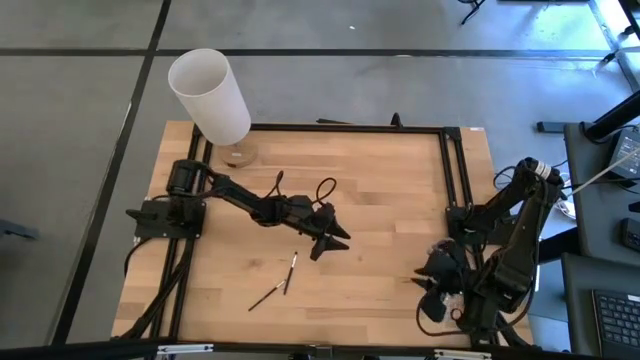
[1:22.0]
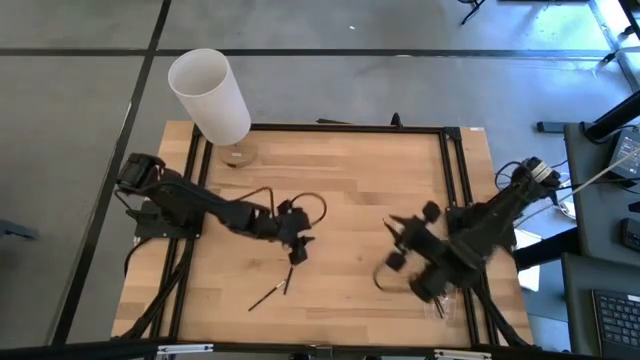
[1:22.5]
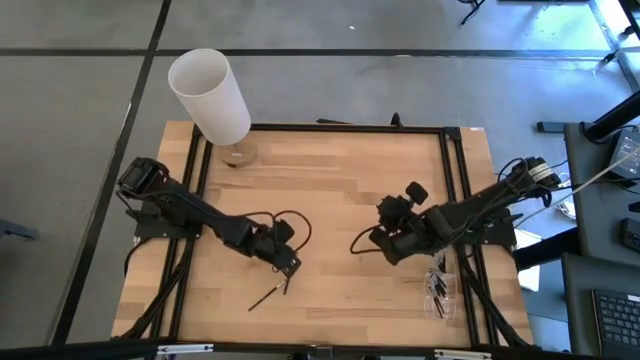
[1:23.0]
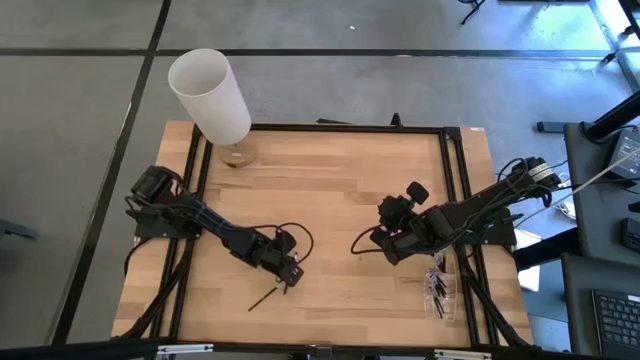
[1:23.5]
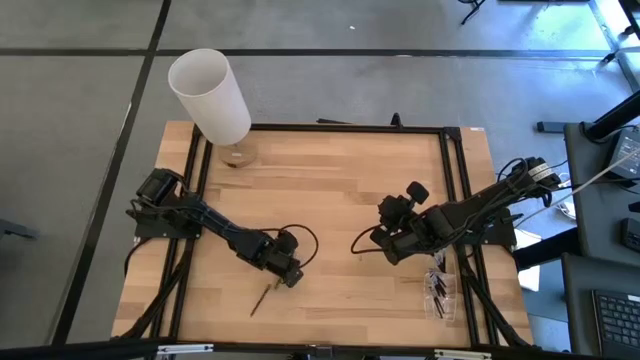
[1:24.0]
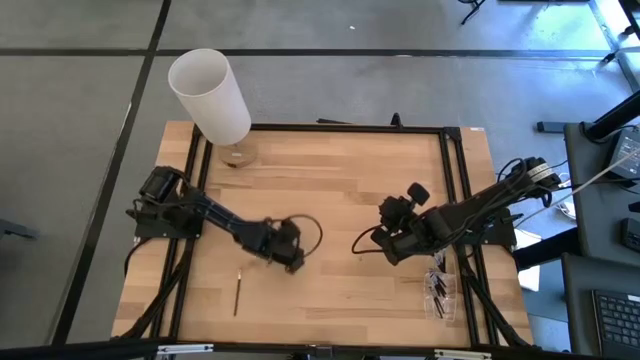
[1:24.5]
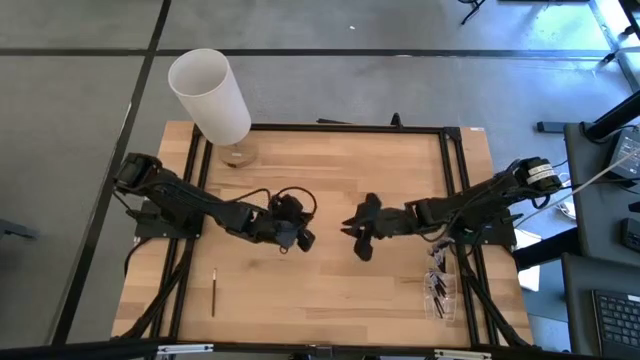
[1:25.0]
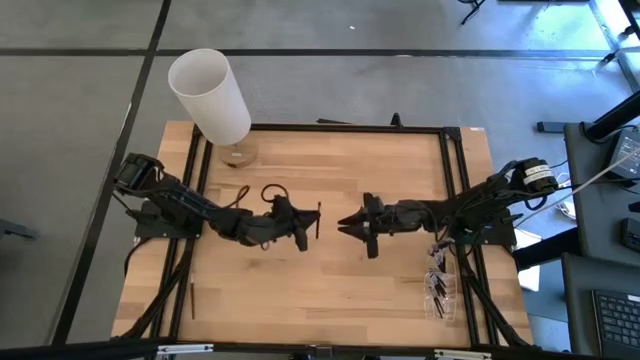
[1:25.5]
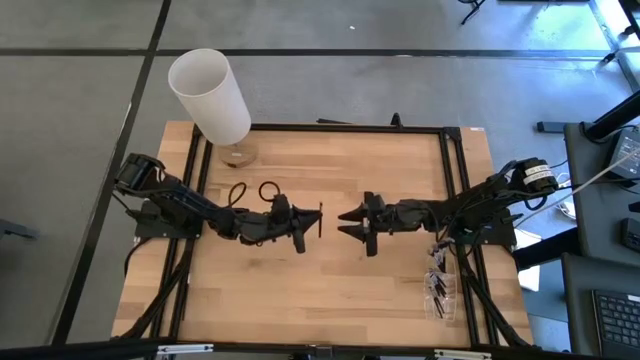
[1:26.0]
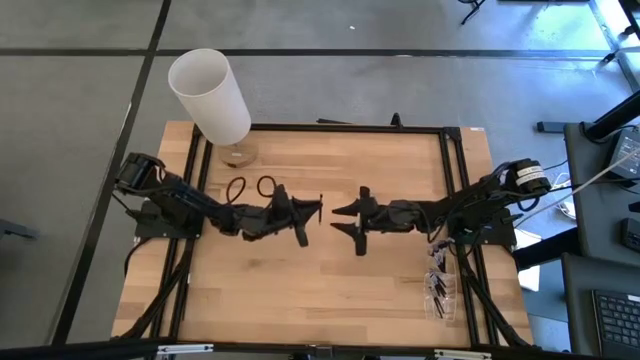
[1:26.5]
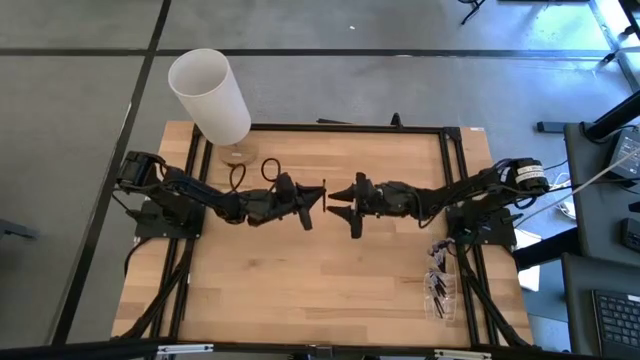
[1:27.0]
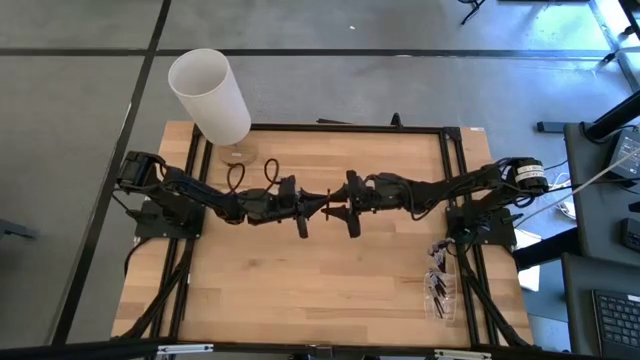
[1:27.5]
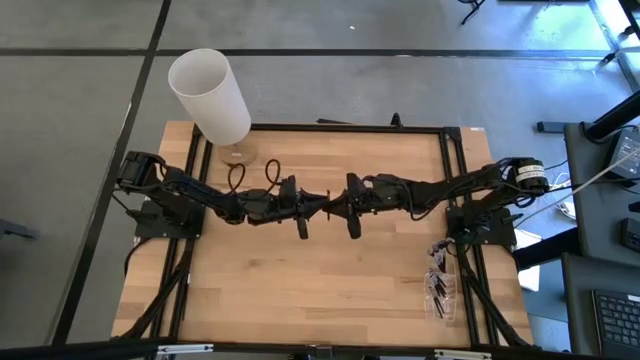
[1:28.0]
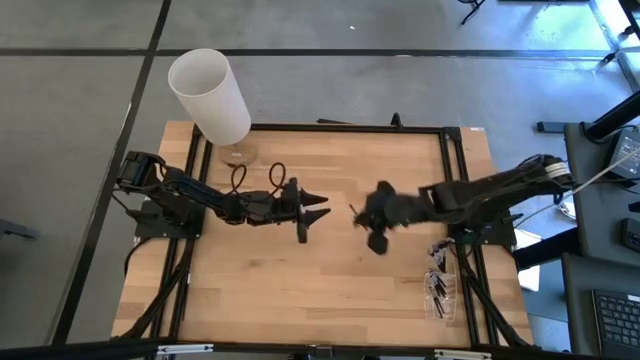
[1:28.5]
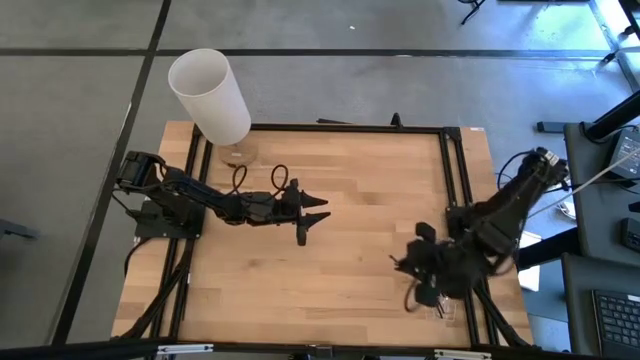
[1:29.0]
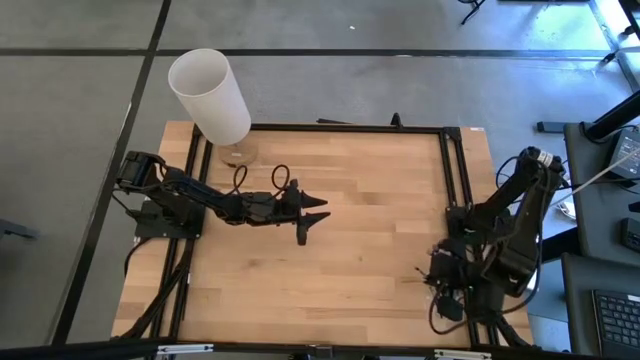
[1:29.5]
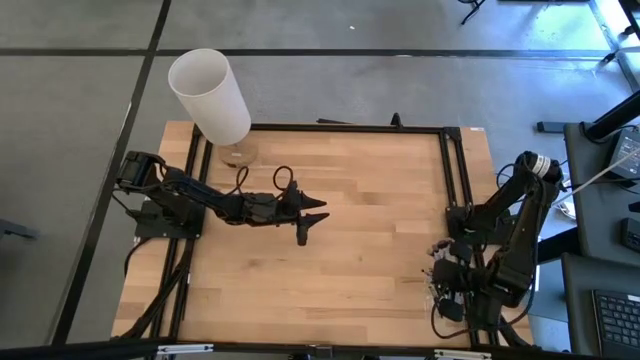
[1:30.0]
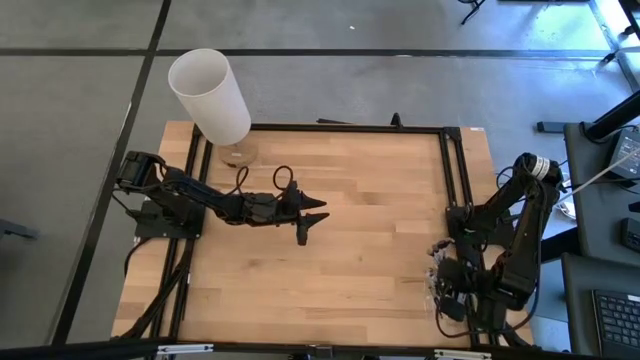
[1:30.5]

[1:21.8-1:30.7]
Task: Put items in baskets/containers
Put the eyeshadow brush into the transparent organizer

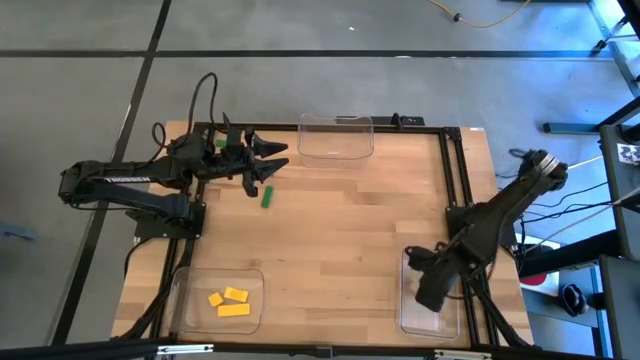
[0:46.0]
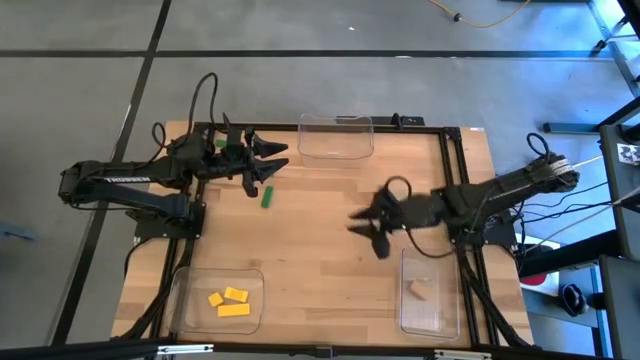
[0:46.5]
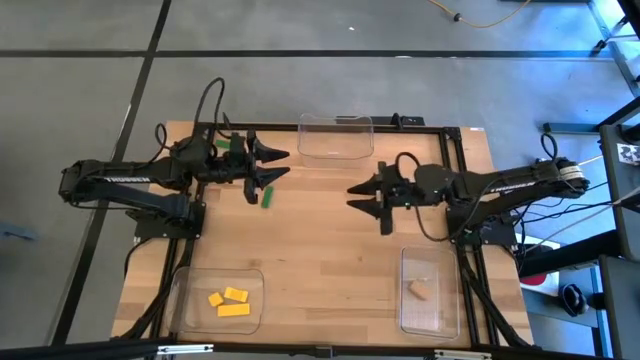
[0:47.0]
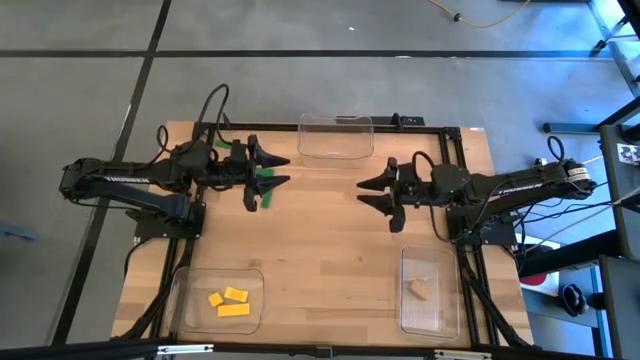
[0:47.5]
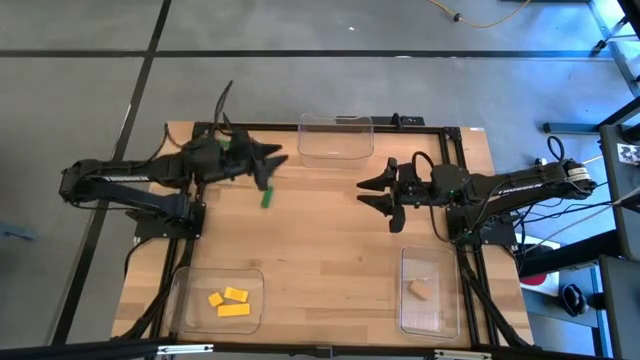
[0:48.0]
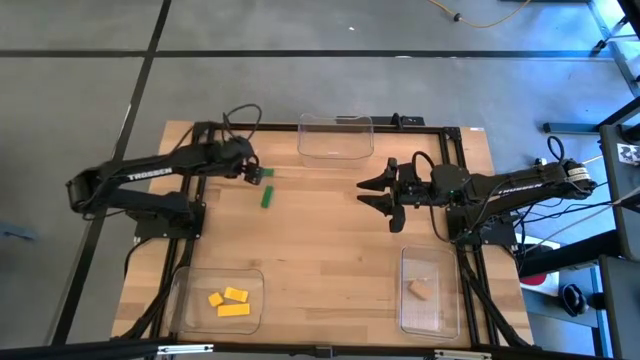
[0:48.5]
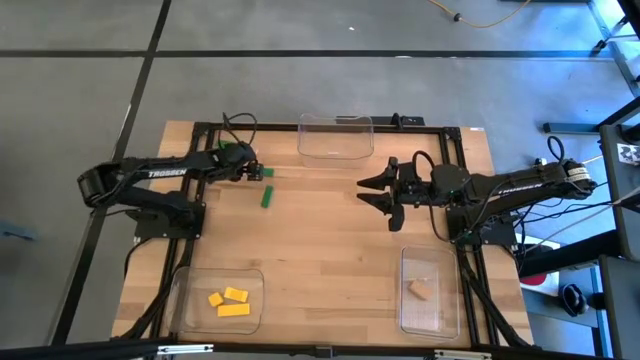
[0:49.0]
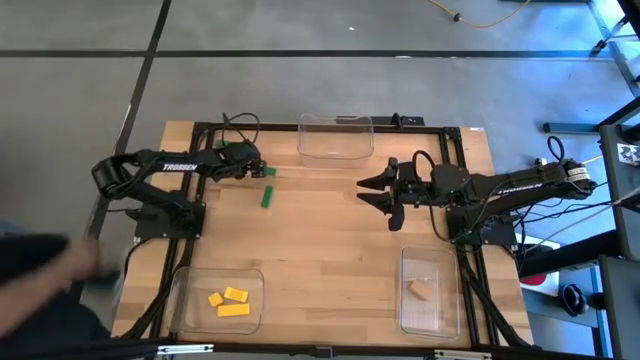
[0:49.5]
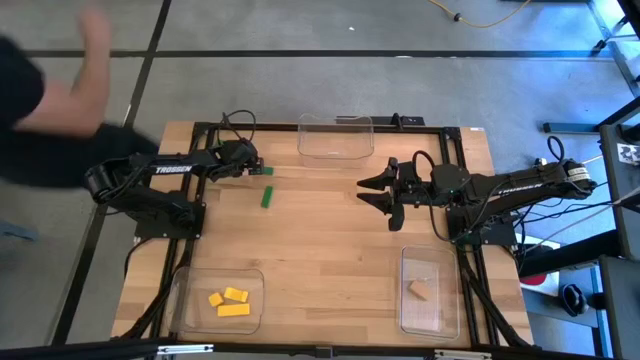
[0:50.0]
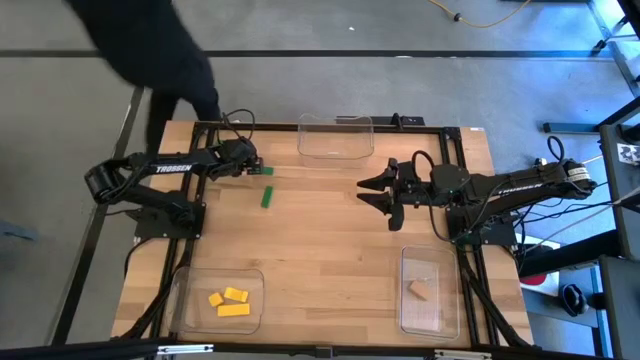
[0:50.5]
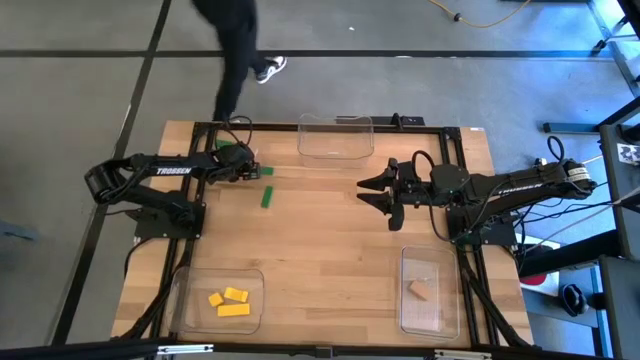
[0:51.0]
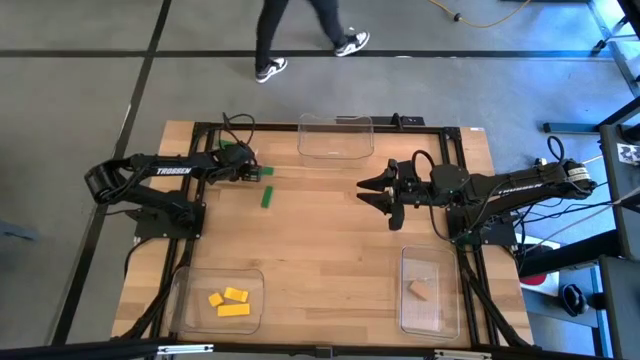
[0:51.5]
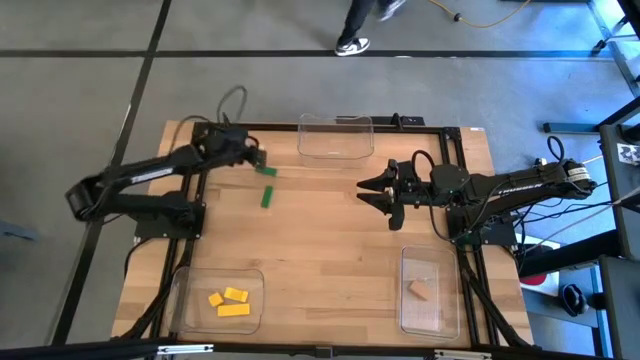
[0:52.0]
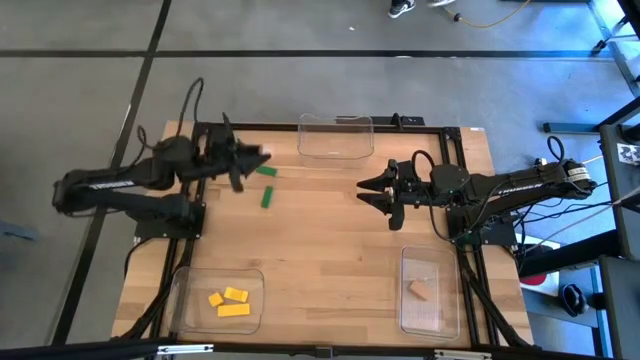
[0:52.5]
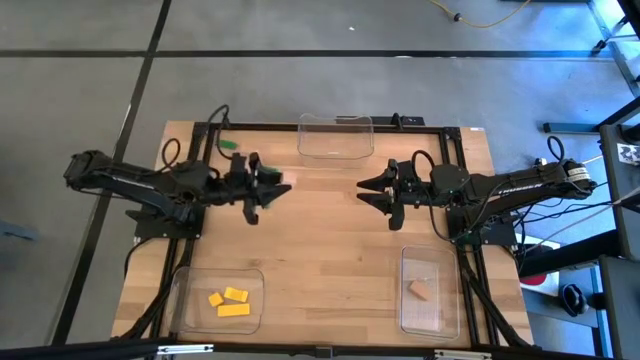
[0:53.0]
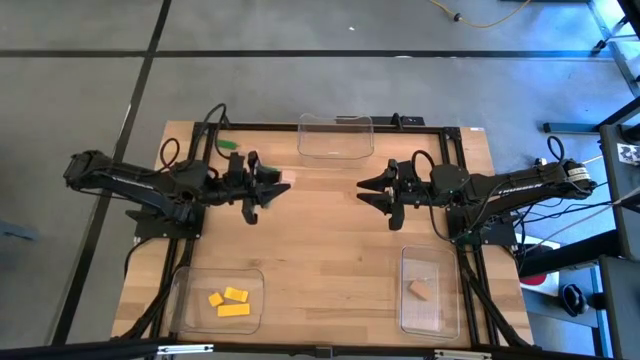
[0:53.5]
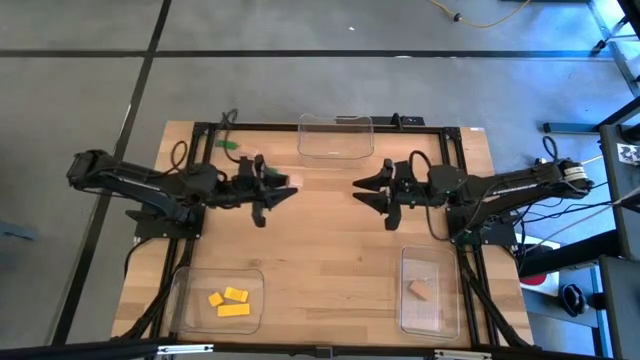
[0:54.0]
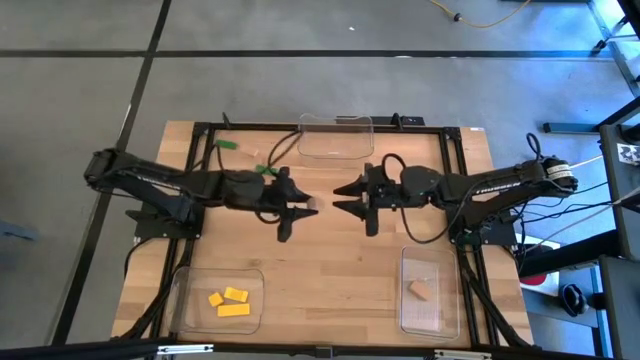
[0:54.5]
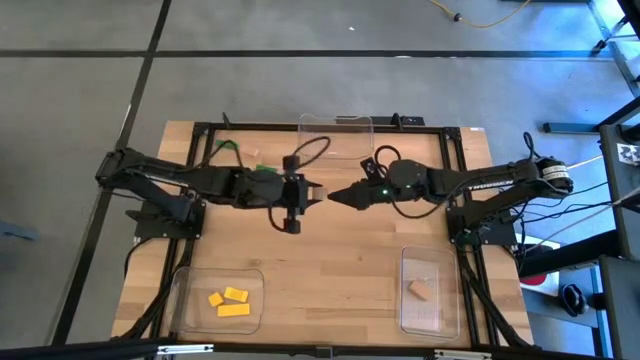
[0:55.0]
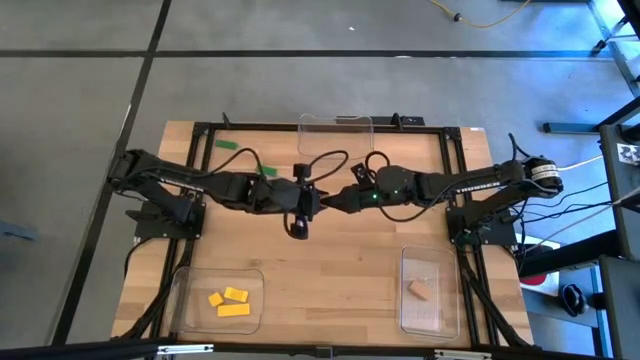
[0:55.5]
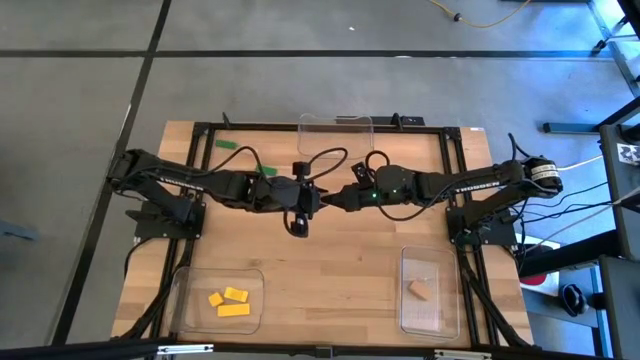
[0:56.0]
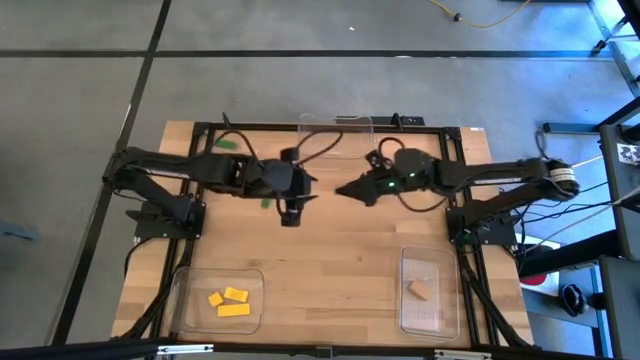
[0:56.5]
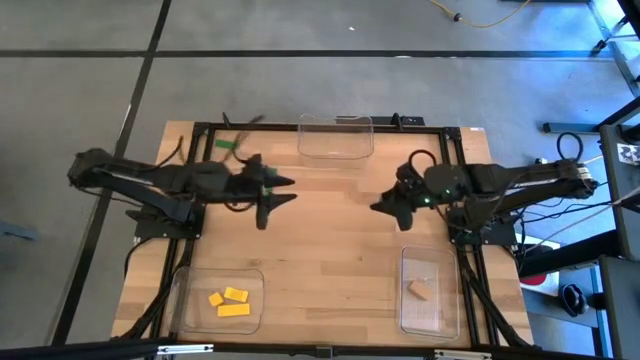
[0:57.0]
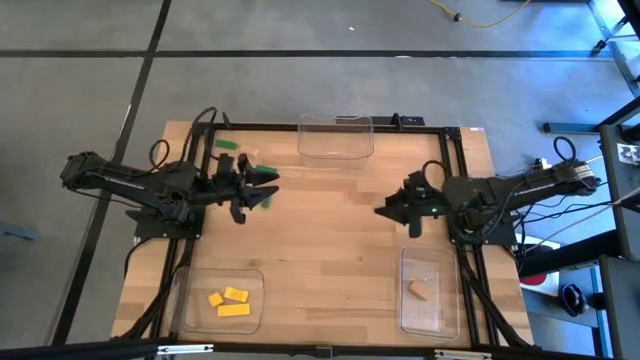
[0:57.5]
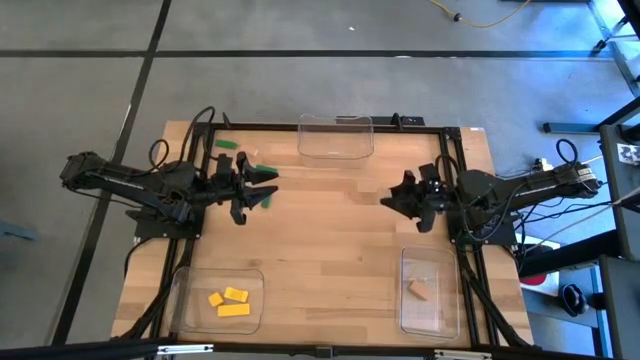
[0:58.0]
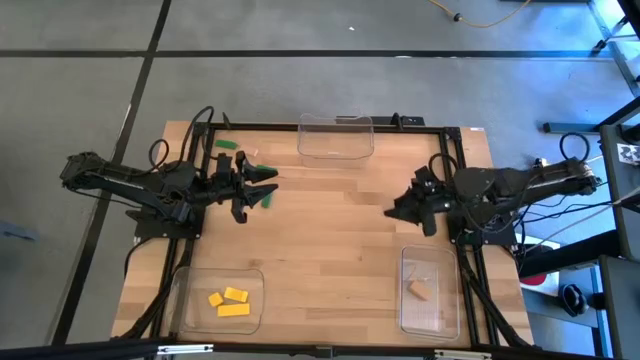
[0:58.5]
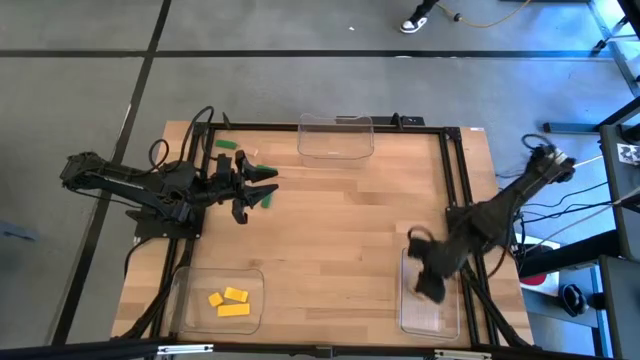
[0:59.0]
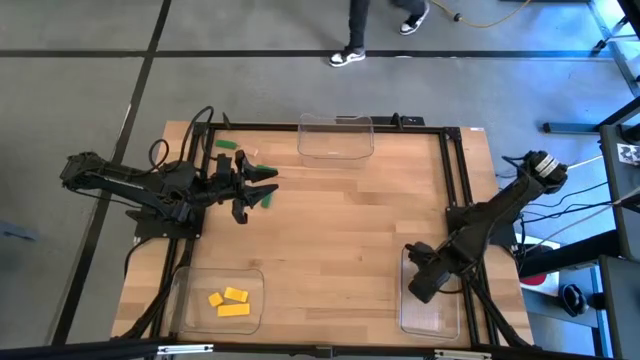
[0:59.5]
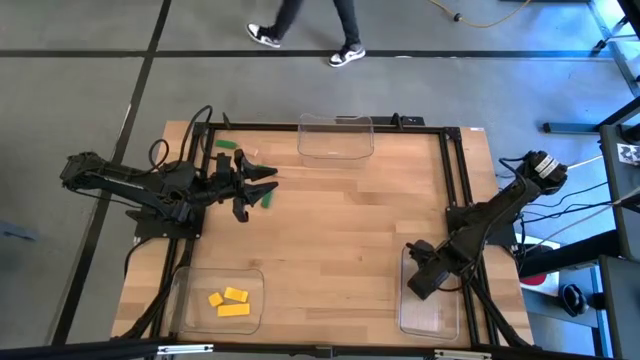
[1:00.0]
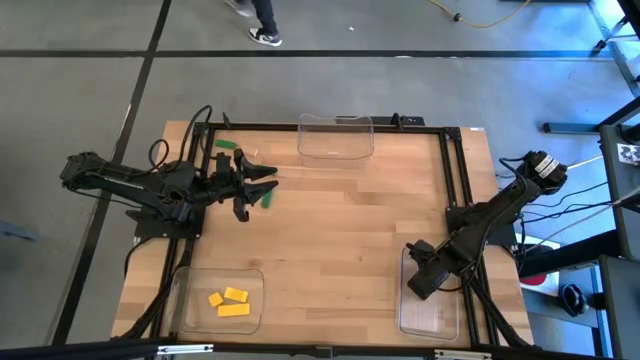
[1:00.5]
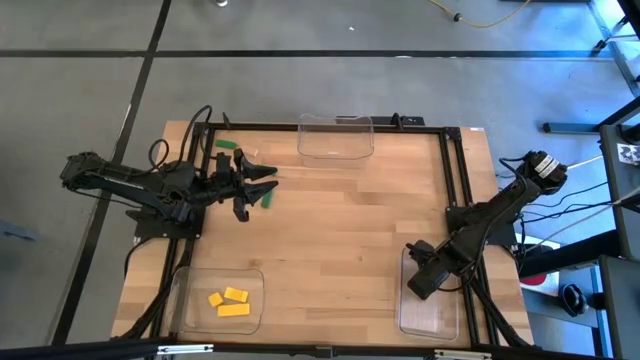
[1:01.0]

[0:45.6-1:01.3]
Task: Sort & place blocks by color
Put the bottom light brown block into the bottom right transparent bin
